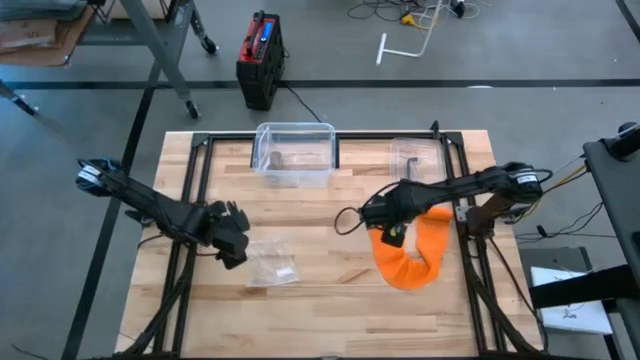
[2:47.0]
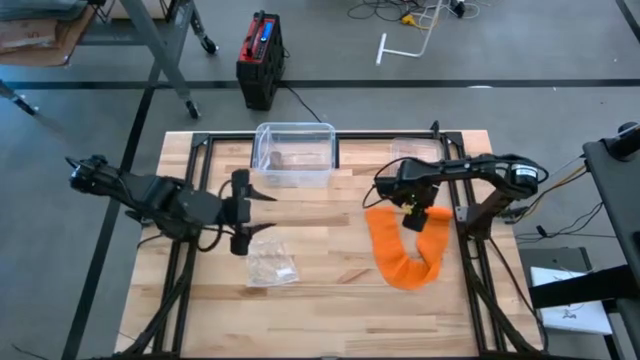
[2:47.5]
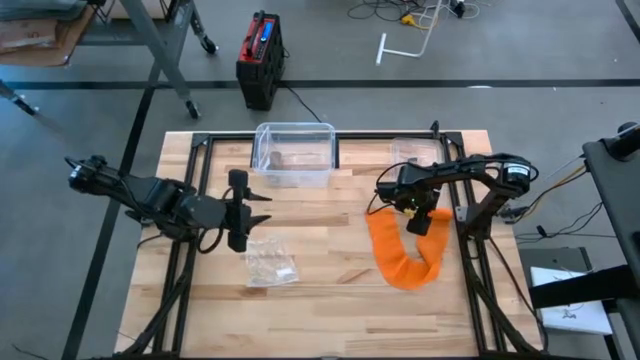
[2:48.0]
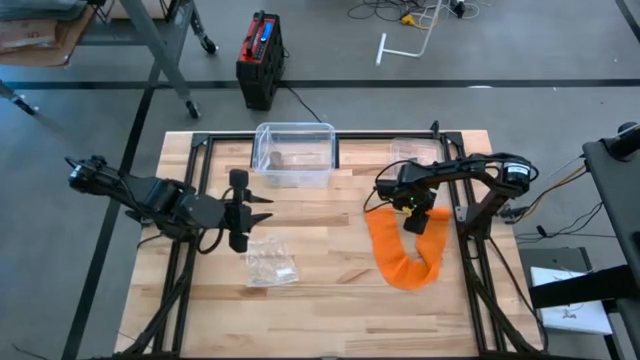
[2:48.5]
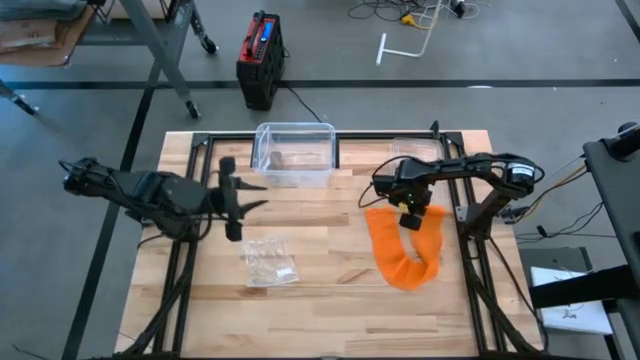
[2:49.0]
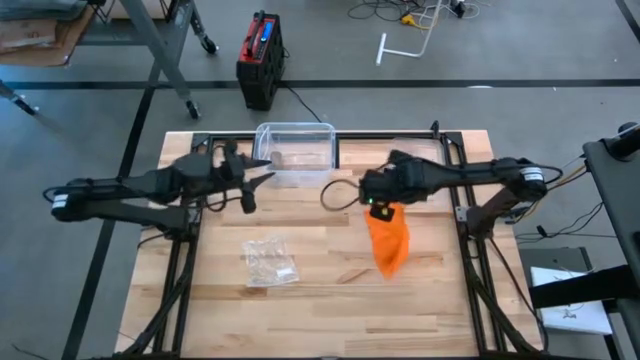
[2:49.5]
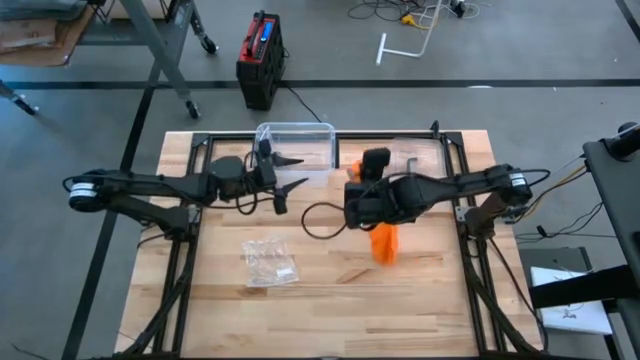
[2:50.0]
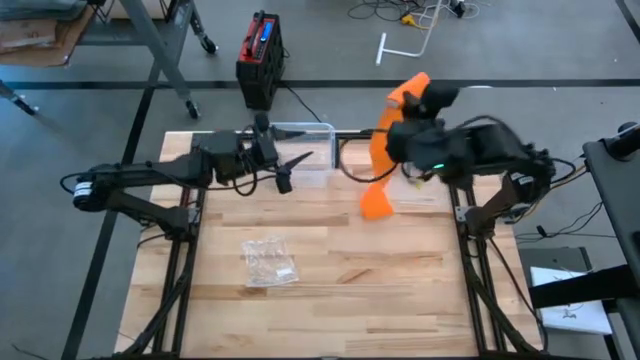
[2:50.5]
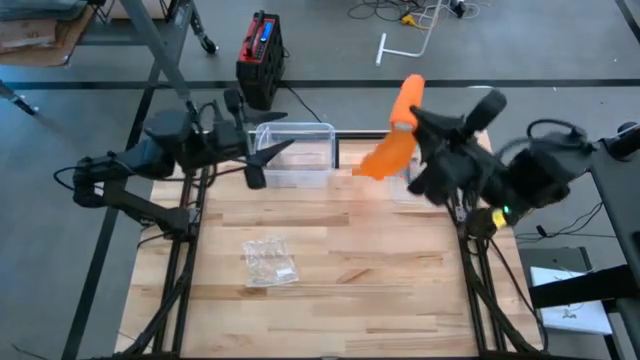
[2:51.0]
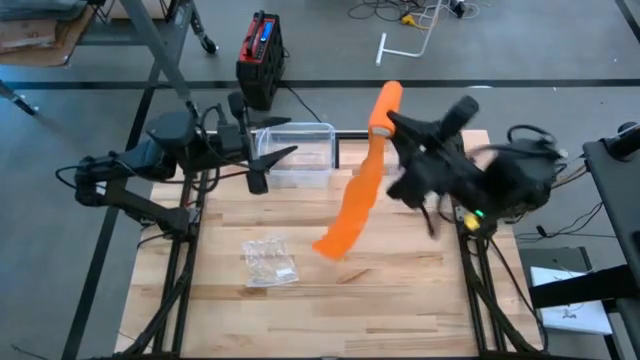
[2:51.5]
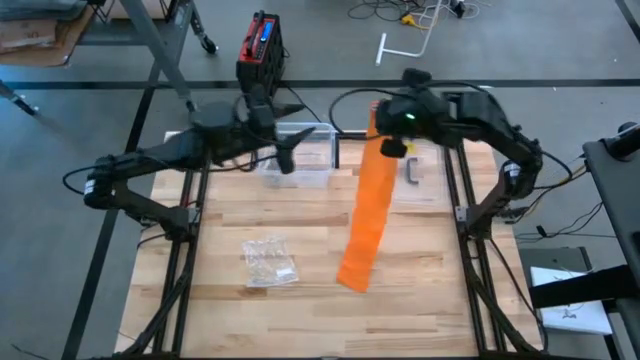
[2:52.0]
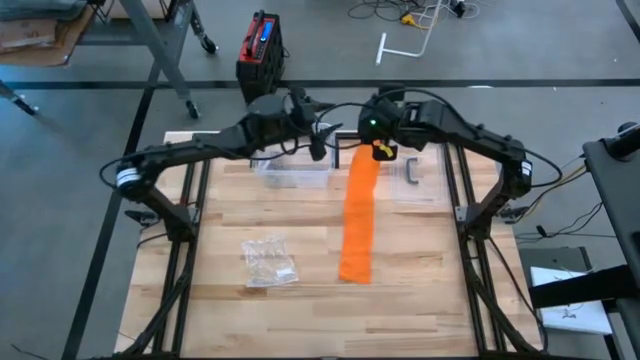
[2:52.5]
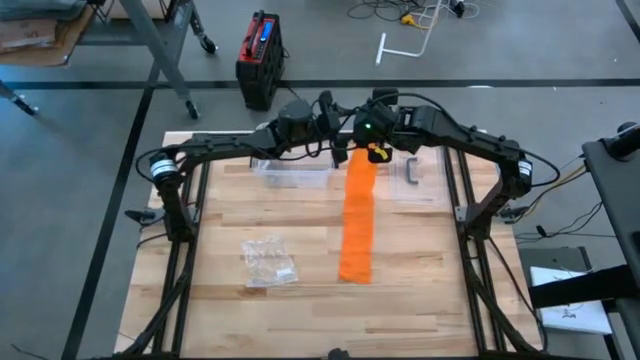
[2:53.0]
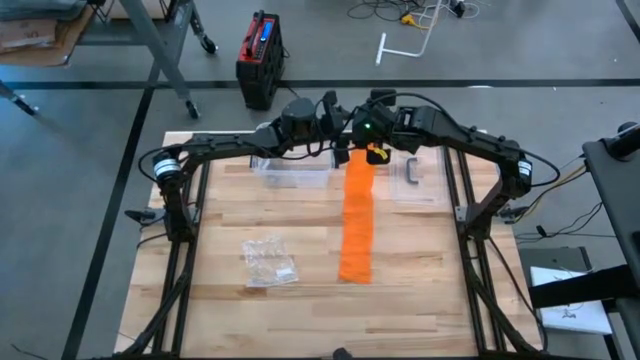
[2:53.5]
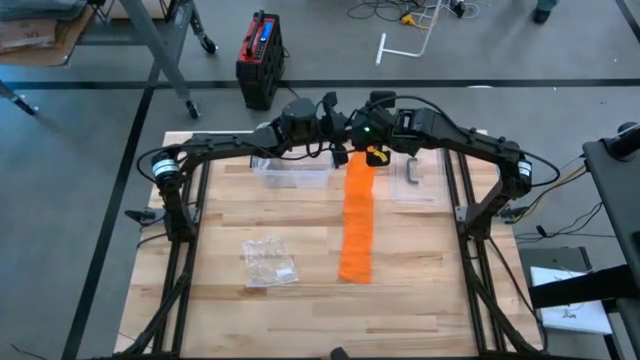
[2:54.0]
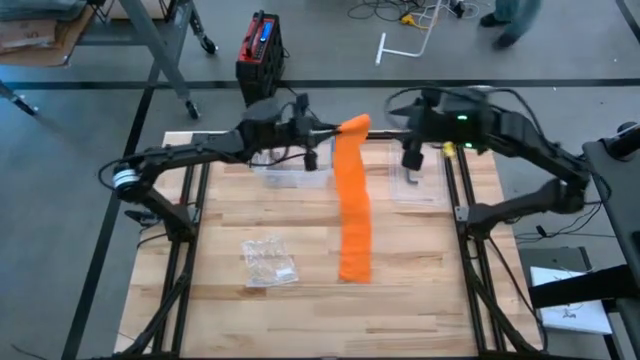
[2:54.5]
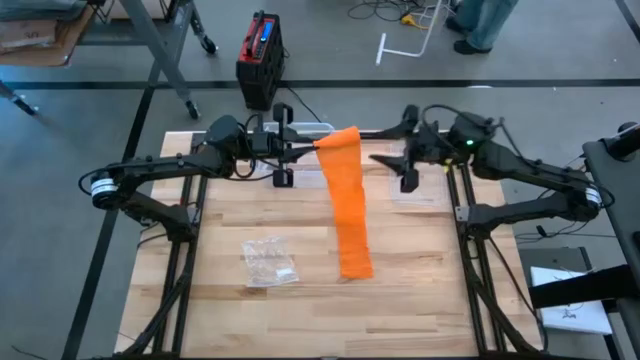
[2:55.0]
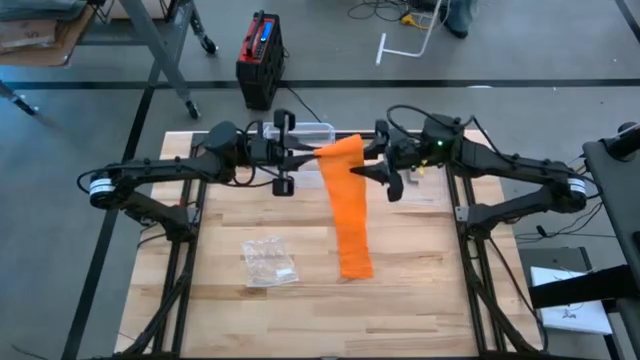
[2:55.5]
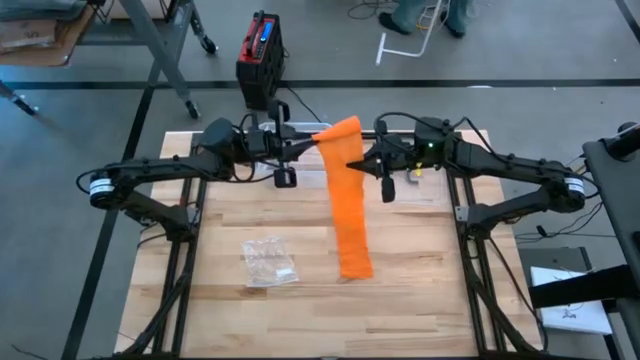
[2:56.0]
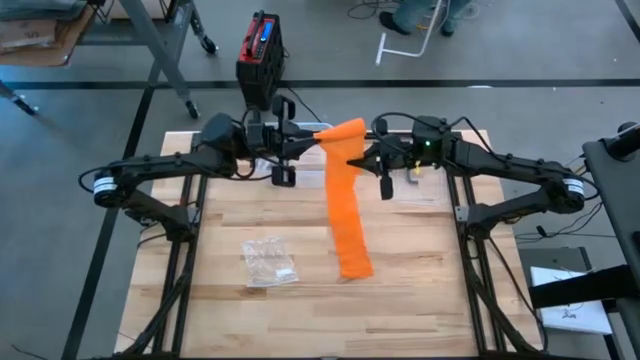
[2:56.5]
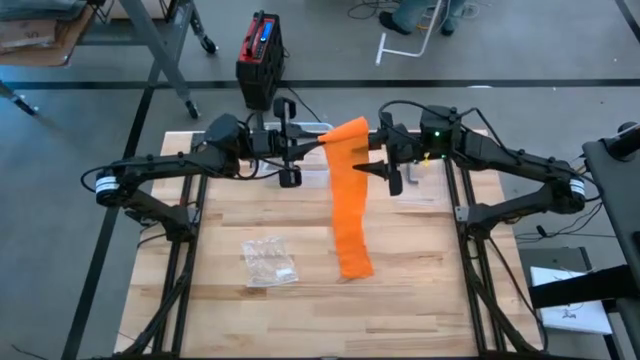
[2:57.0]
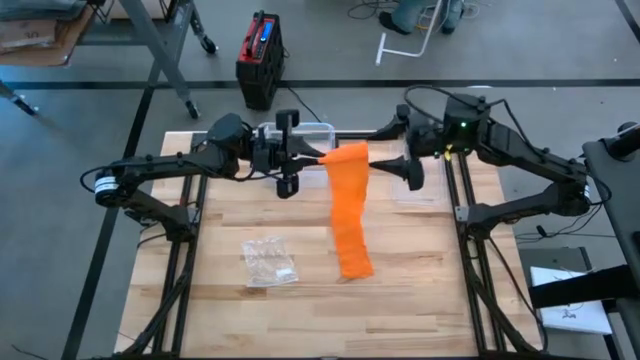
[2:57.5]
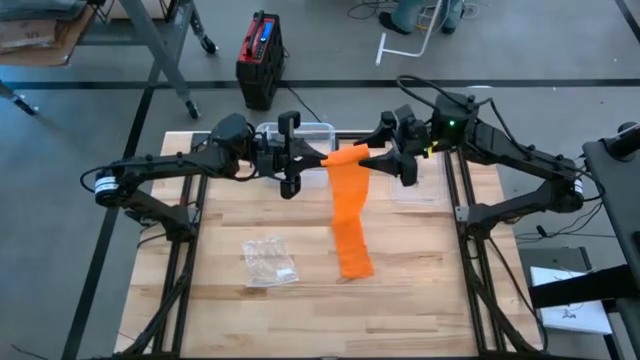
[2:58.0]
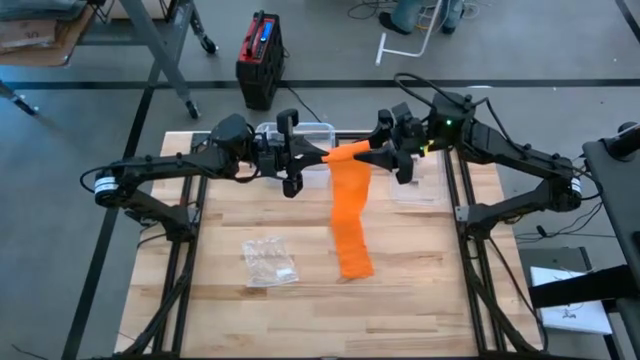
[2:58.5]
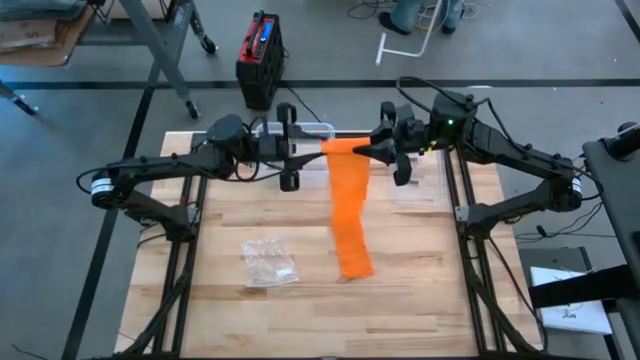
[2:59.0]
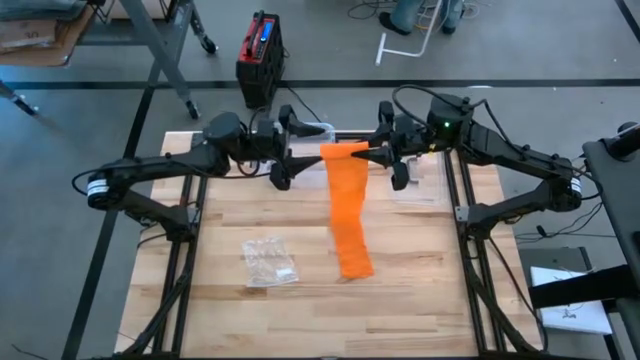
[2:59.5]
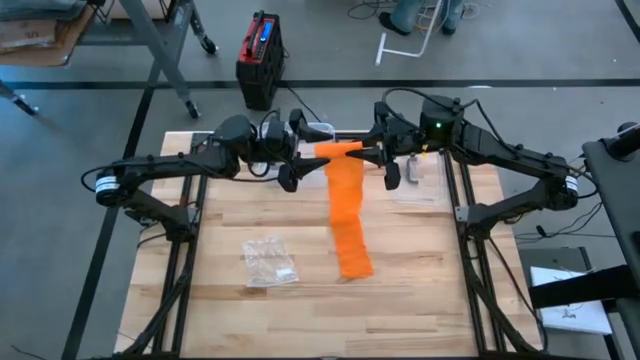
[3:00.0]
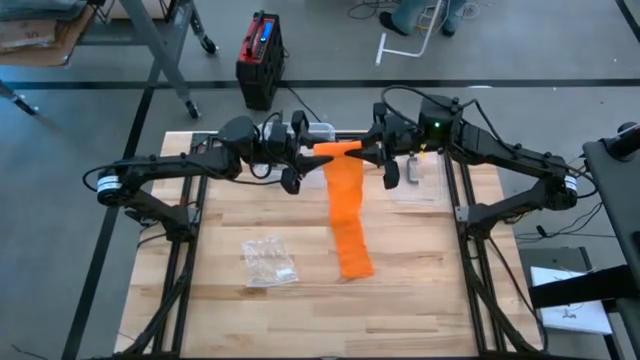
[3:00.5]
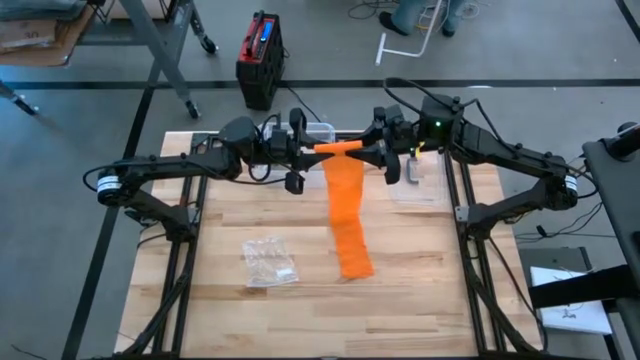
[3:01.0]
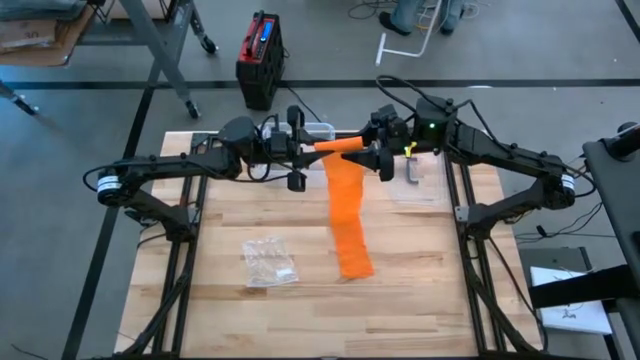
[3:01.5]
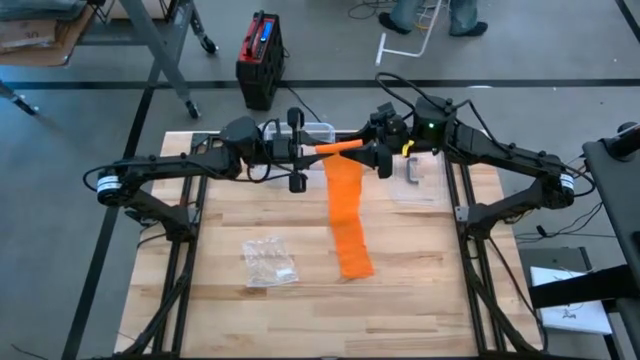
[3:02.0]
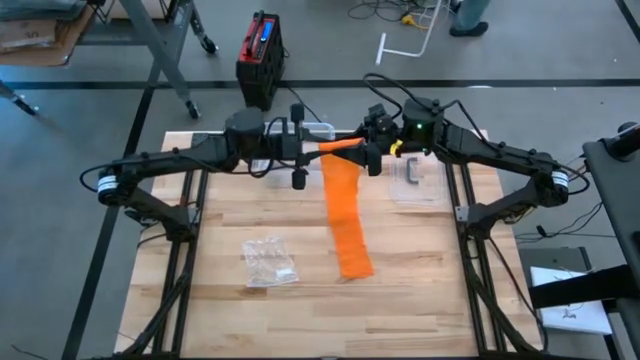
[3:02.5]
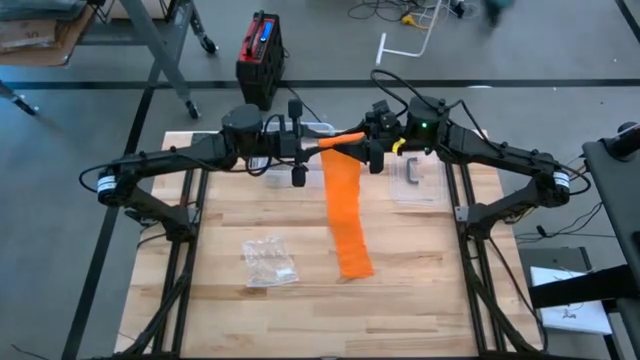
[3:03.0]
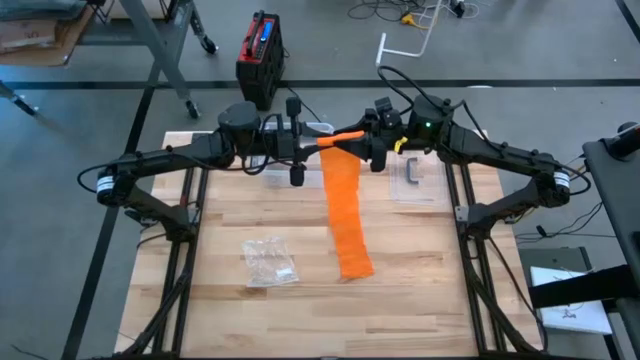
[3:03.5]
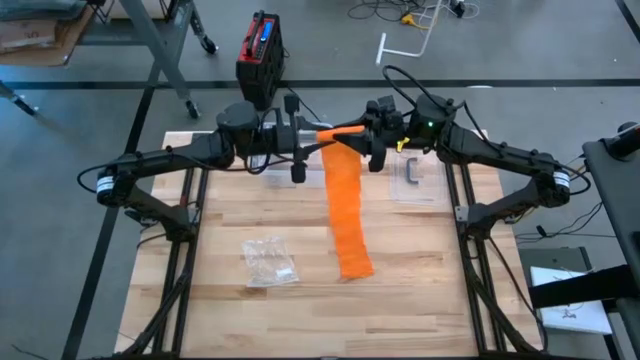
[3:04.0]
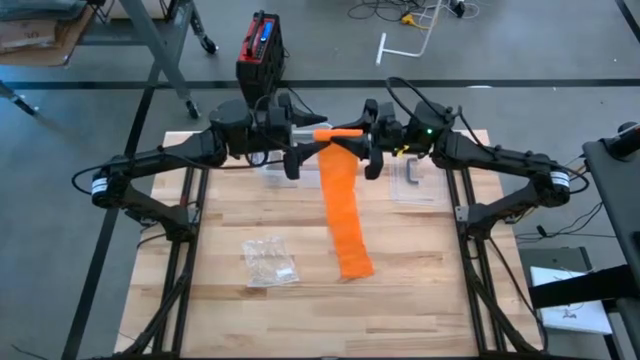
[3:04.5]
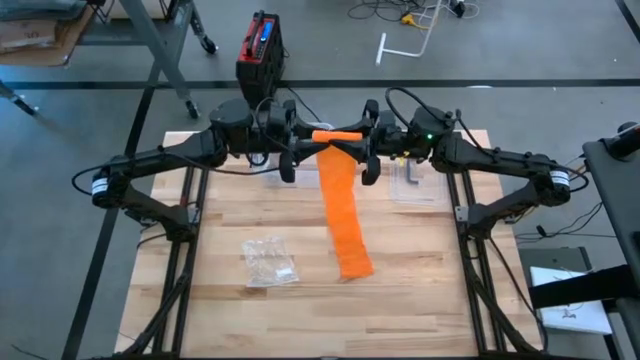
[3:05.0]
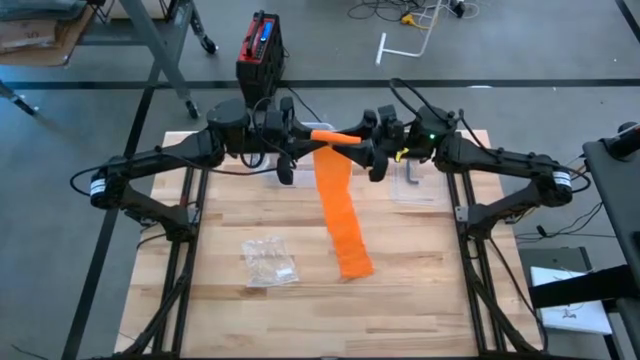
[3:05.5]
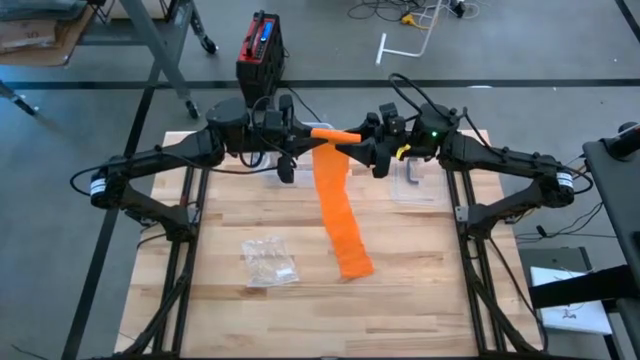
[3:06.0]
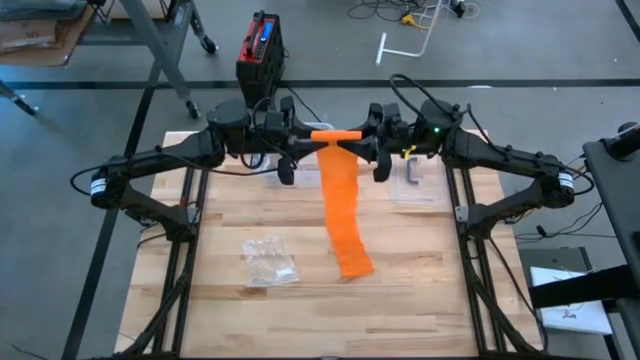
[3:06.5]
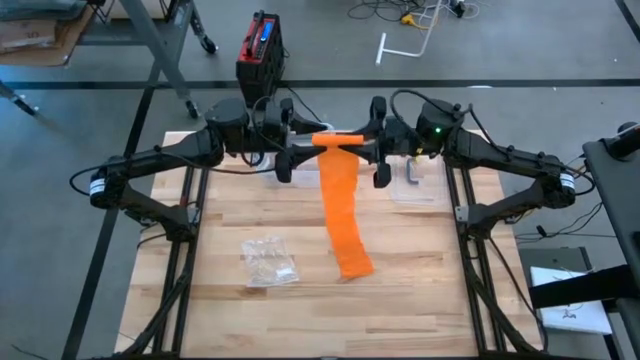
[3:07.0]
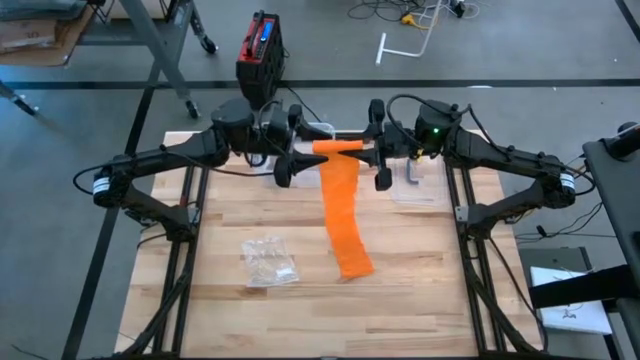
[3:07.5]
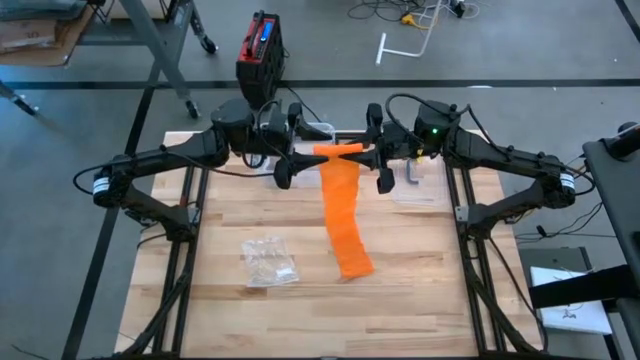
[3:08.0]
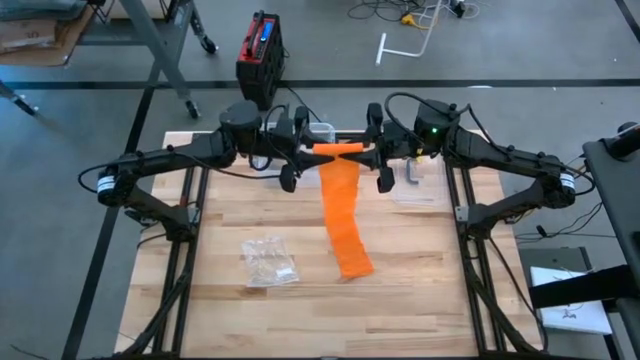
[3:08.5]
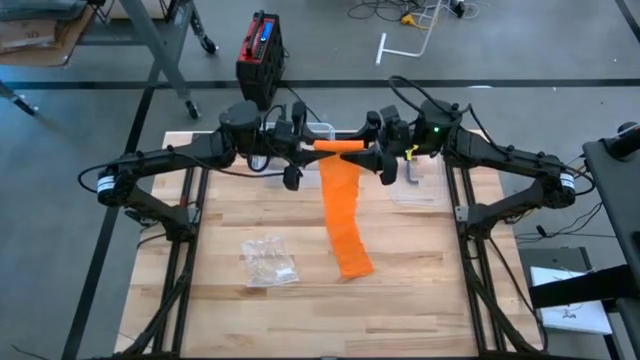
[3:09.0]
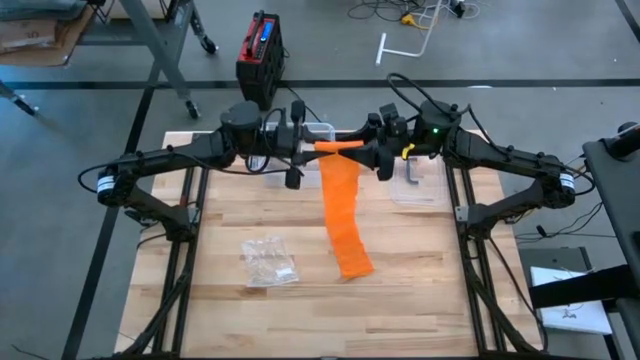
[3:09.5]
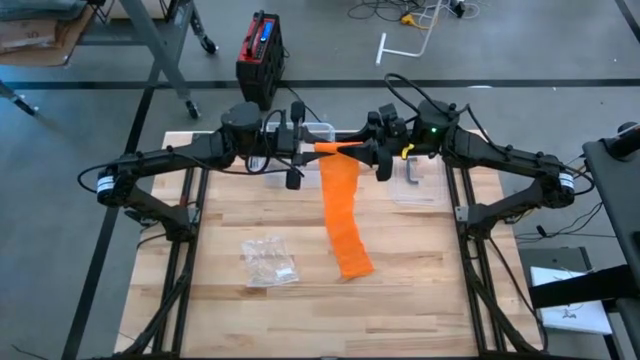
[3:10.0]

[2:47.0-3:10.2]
Task: Roll bandage
Roll the orange bandage
